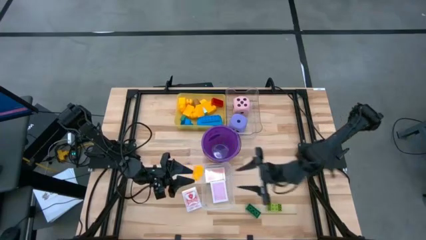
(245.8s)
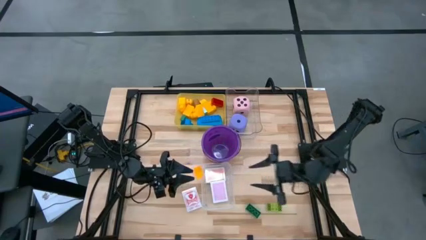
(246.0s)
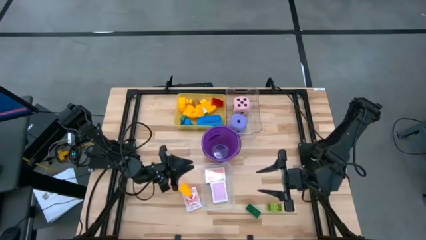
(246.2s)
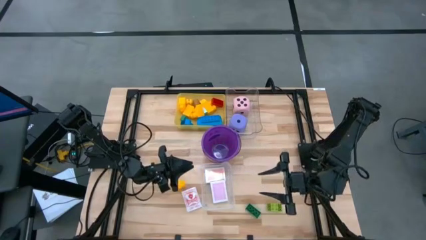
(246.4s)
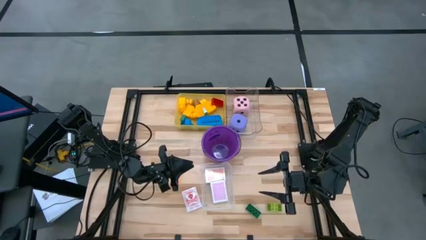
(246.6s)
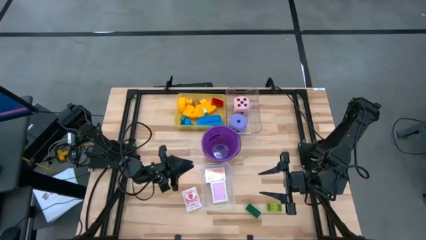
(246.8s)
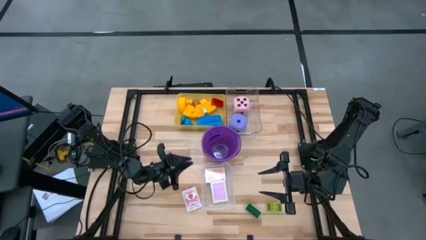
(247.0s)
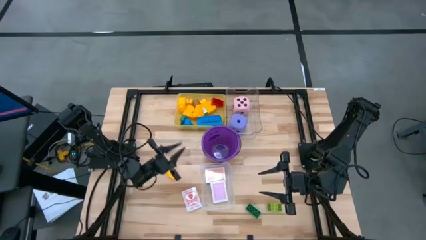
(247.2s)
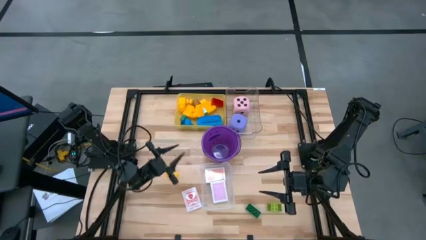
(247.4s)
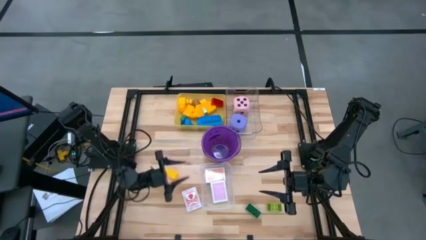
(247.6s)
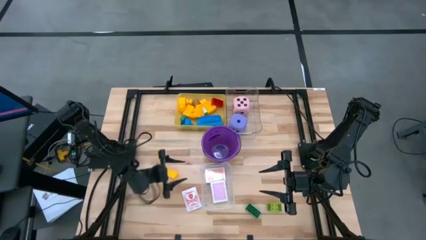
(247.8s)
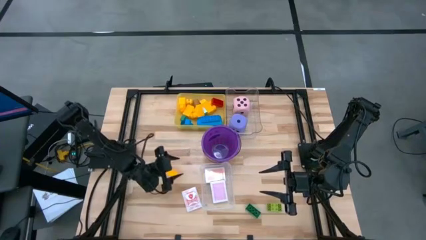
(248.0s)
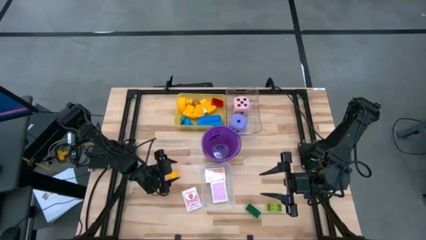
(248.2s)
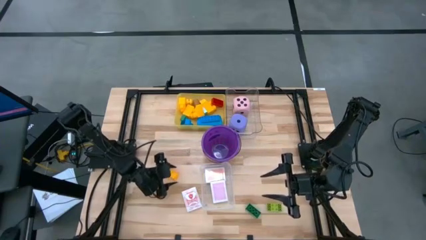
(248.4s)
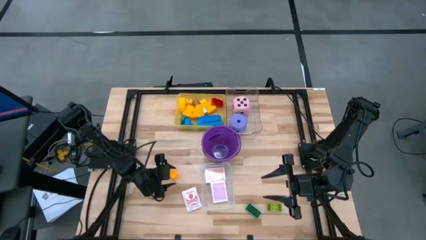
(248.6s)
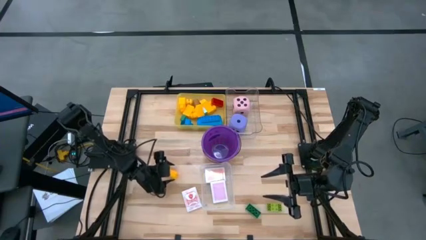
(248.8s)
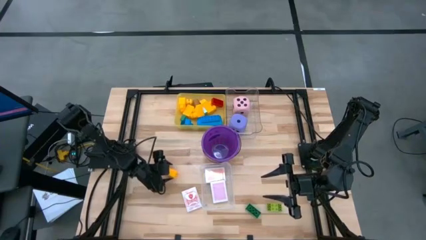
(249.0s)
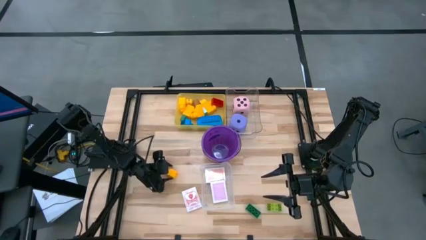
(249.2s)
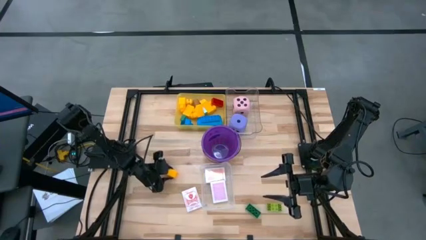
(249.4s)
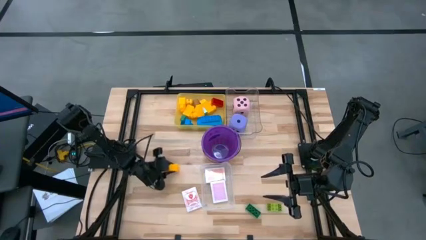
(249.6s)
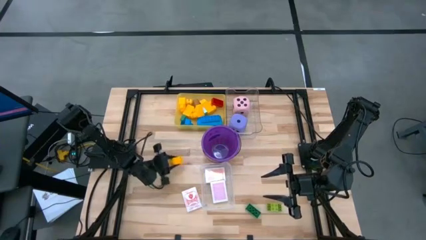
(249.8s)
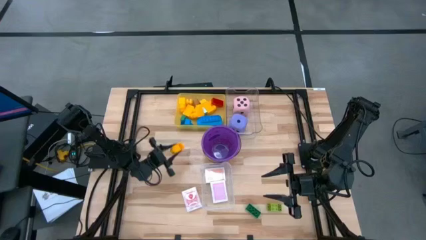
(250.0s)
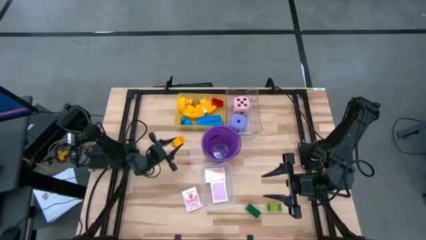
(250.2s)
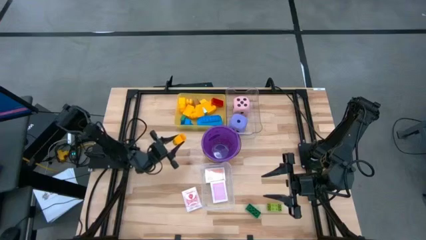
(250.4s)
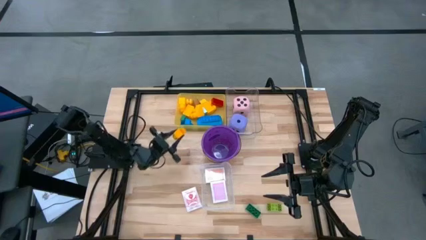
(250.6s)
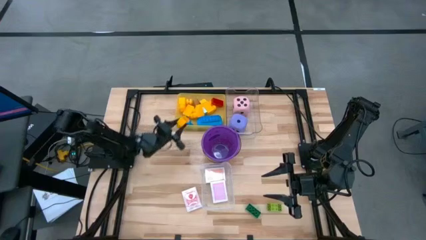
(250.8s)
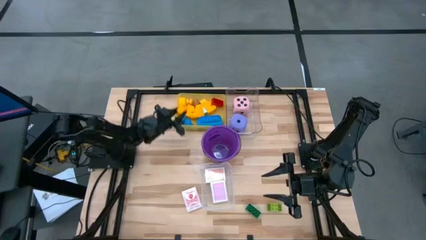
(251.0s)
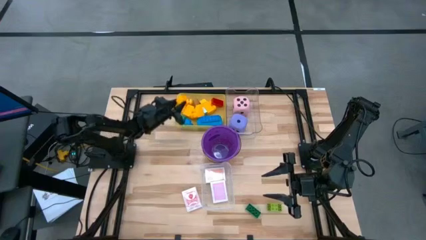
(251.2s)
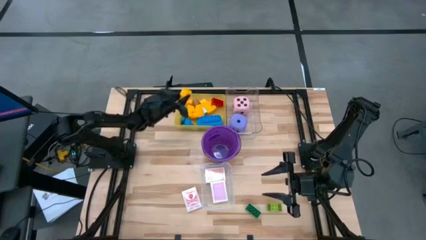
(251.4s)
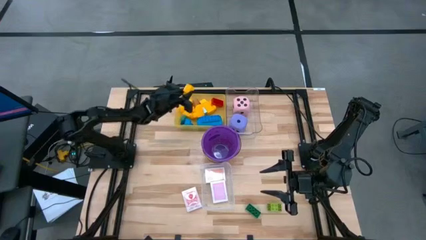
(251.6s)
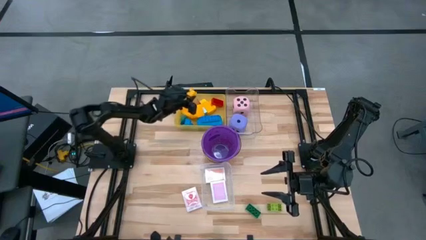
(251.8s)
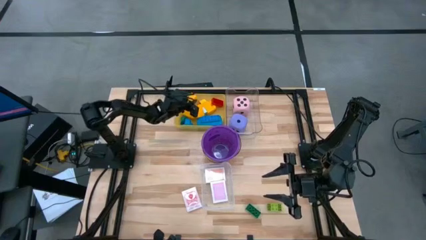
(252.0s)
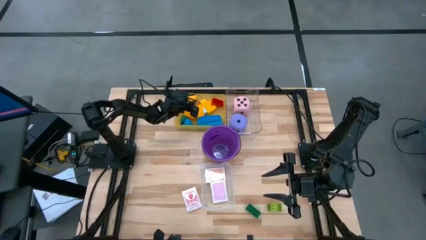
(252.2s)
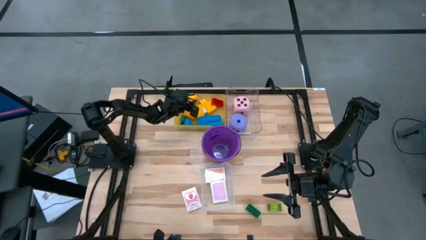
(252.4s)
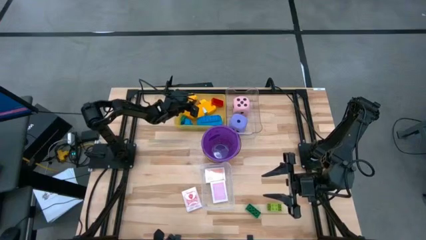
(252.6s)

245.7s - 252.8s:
Task: Pick & Place Toys
Put the yellow game piece into the yellow bin

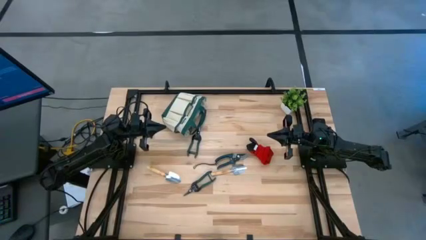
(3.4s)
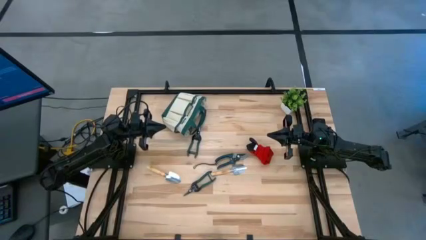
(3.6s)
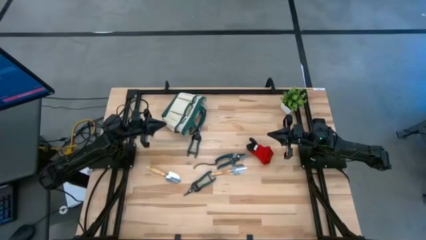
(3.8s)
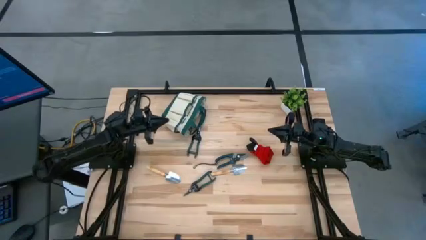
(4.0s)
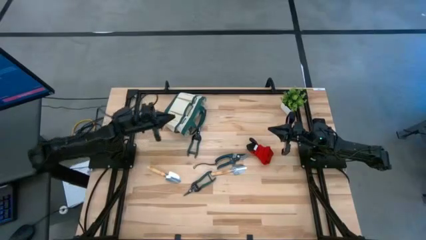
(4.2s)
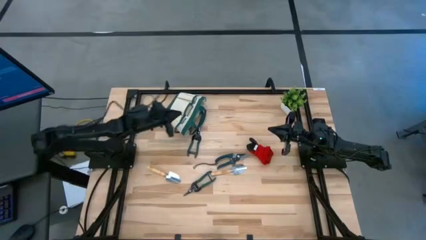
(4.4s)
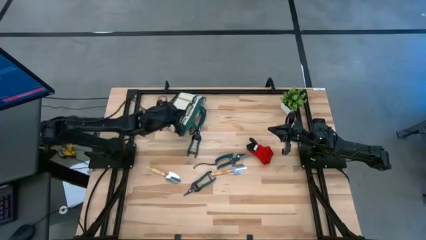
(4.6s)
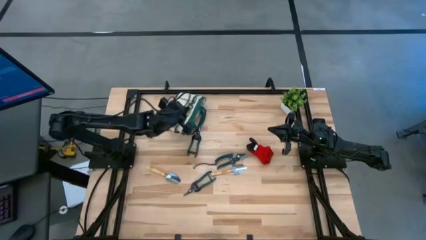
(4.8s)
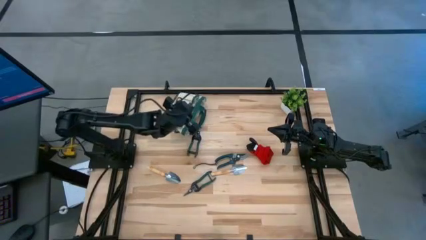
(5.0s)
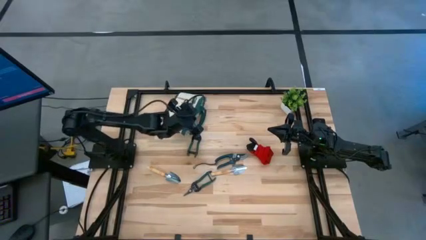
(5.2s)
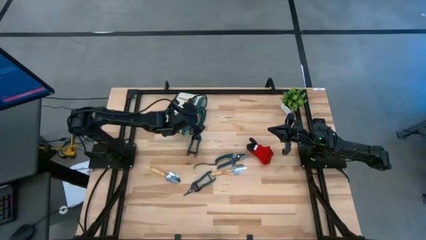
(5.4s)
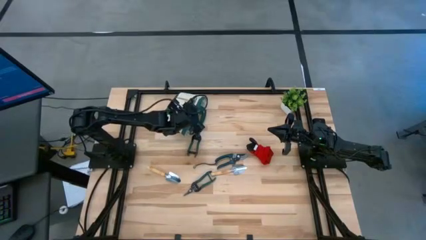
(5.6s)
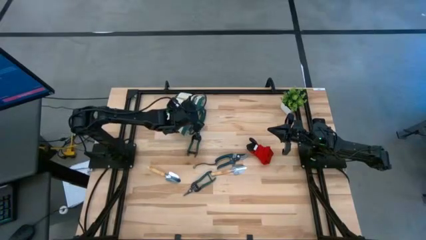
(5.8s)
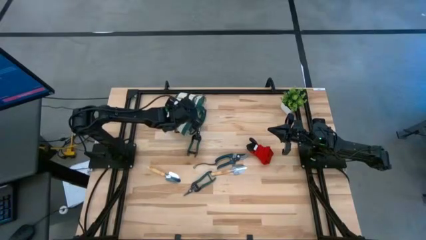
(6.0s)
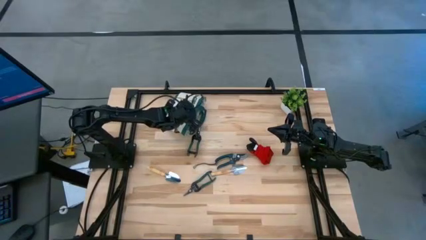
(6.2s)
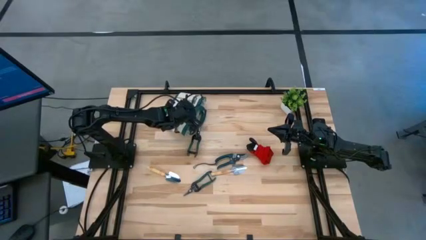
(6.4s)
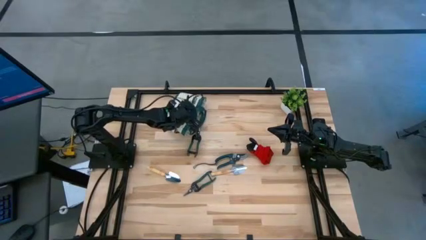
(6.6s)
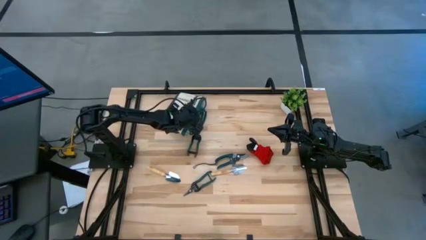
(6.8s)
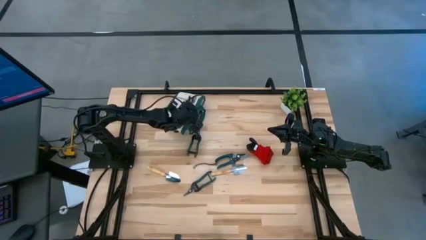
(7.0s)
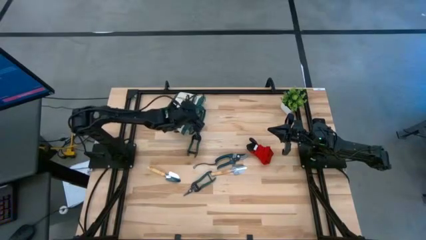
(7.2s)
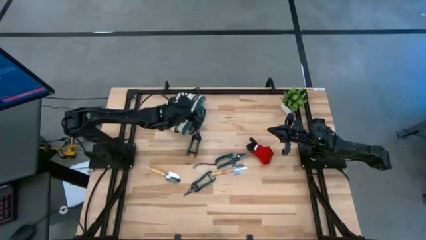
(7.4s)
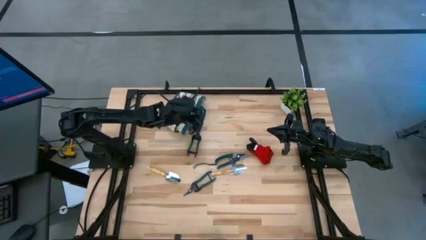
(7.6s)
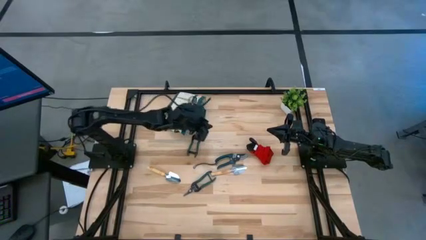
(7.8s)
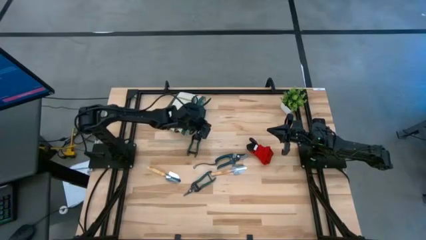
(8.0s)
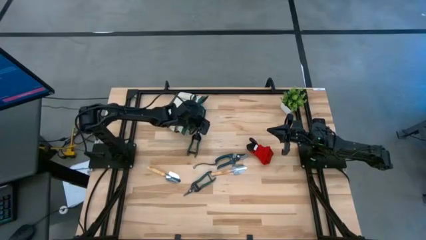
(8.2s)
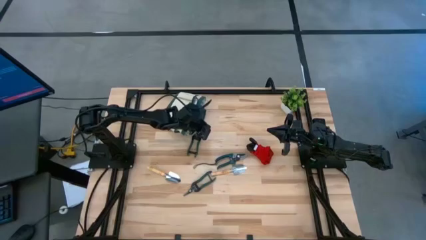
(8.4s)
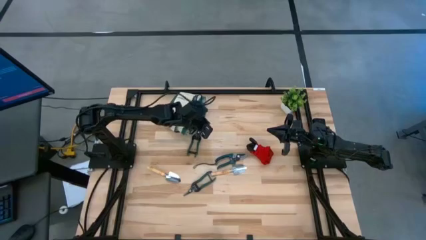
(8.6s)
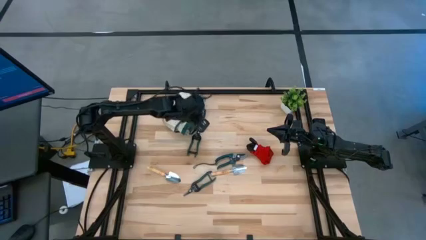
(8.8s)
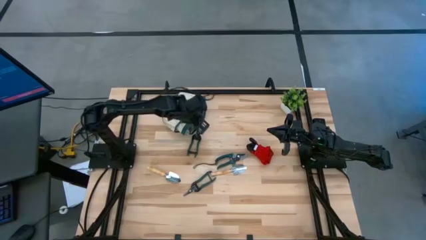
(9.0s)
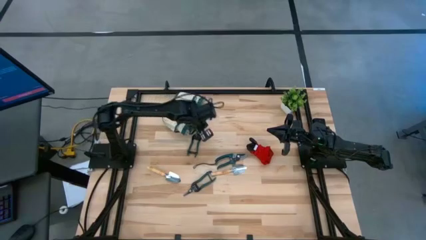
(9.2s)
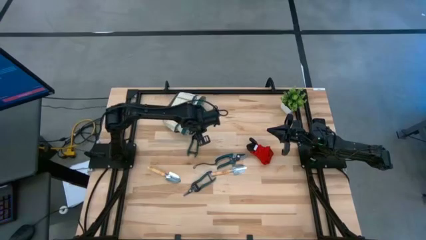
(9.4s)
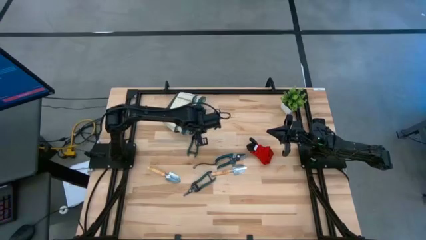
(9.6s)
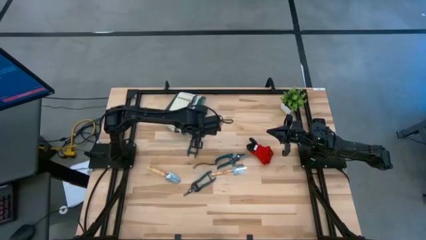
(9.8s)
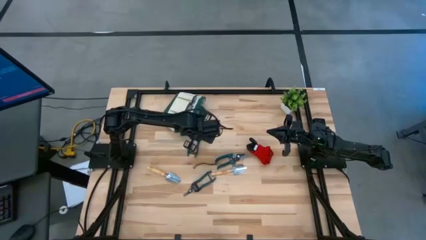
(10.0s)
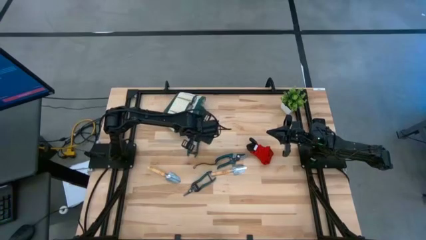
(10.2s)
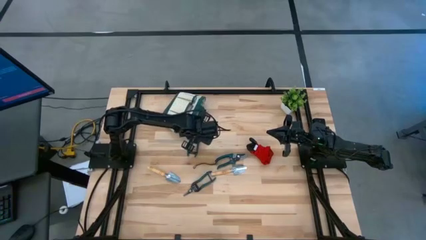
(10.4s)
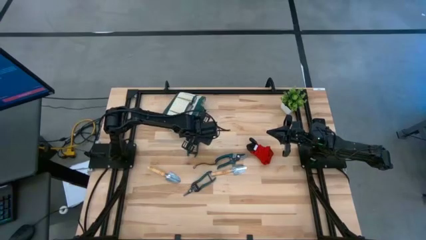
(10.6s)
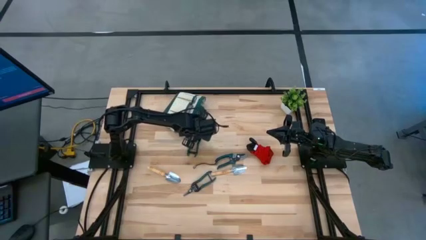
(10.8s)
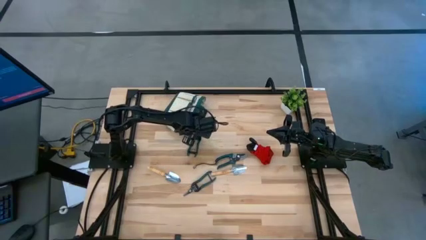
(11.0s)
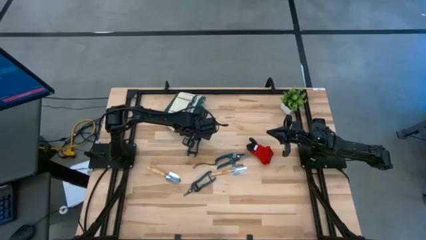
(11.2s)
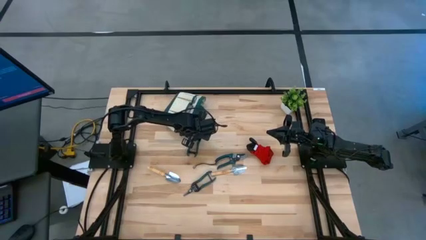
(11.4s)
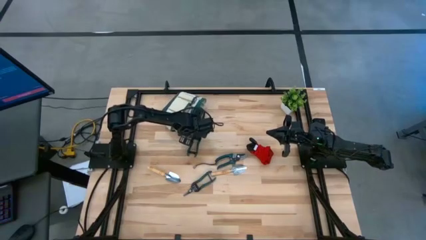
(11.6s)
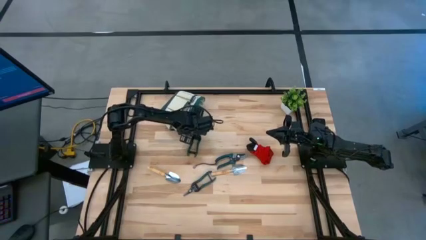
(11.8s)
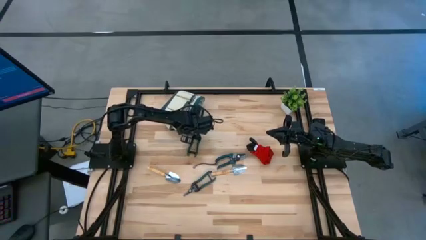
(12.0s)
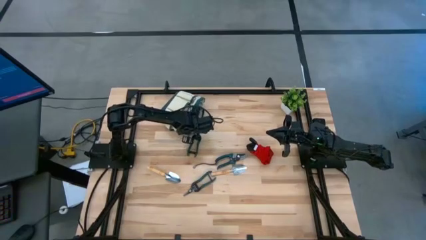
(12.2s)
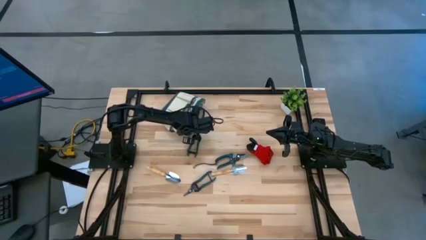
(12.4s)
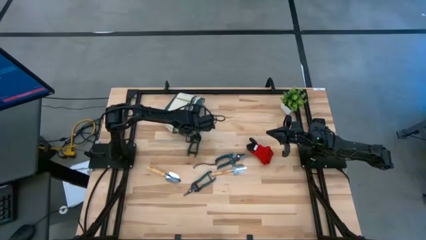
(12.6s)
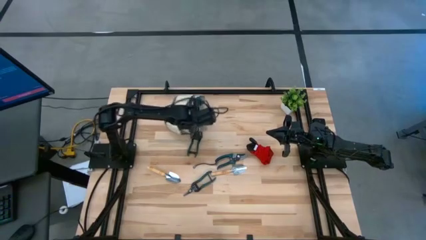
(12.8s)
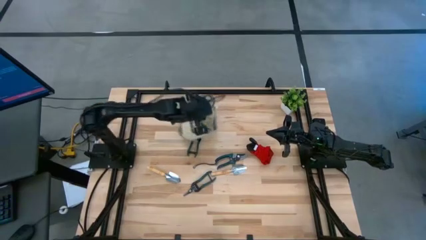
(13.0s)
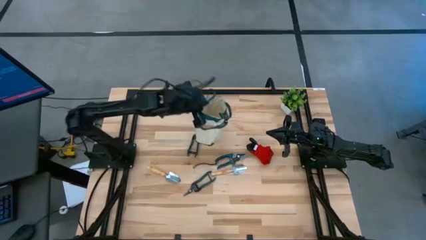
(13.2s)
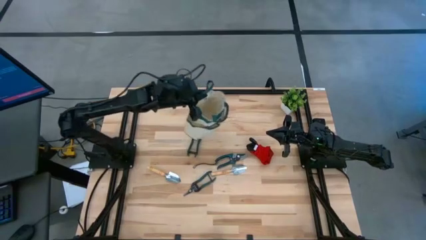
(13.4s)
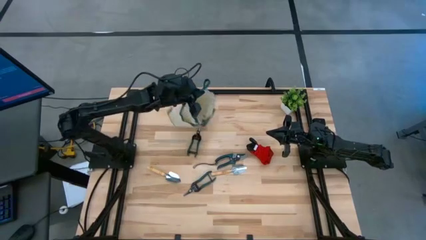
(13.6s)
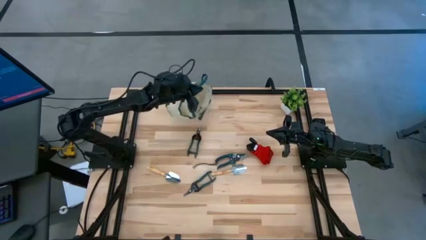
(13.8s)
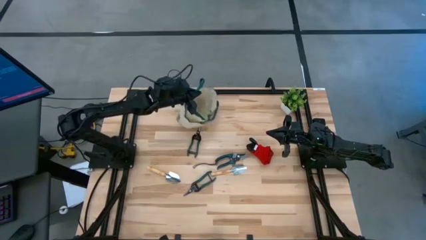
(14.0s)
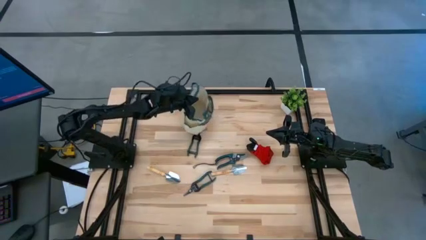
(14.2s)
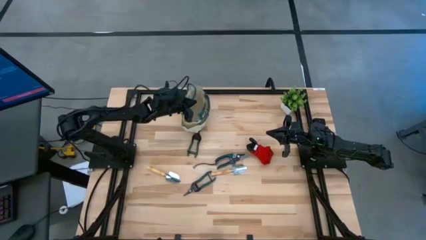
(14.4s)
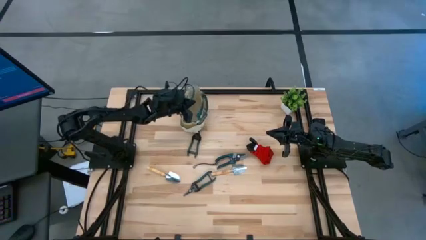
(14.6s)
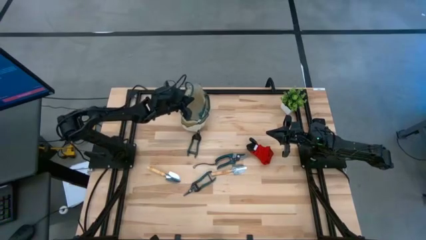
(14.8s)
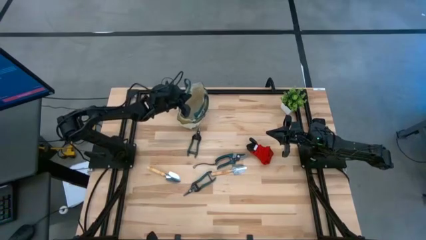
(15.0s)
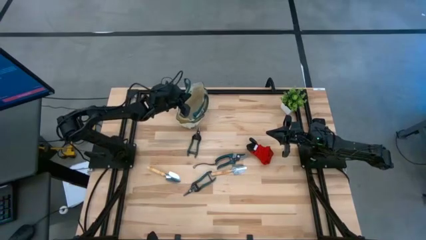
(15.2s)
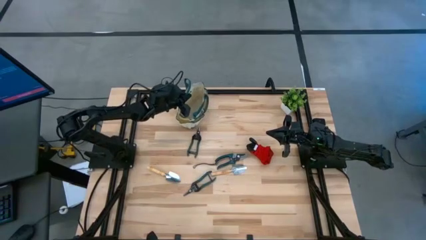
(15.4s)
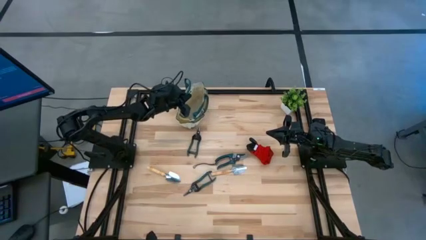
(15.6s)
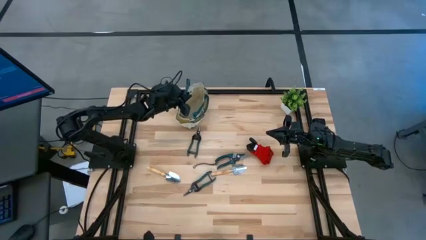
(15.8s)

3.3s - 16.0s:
Task: Pick & Place Garden tools in Gardening bag
Prepare the brown gardening bag
